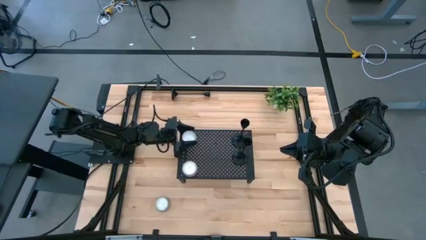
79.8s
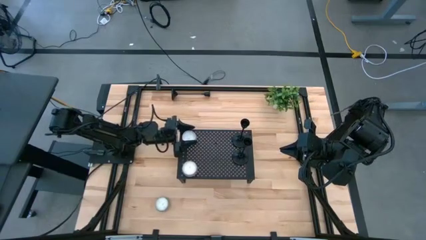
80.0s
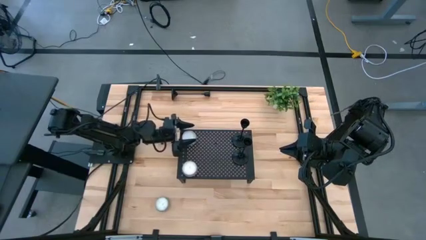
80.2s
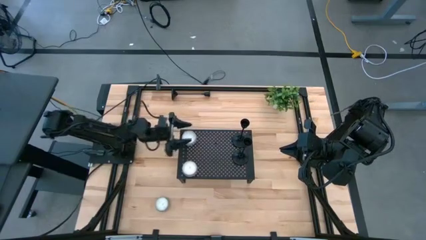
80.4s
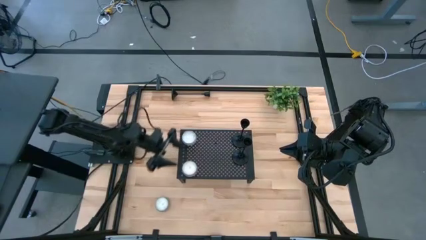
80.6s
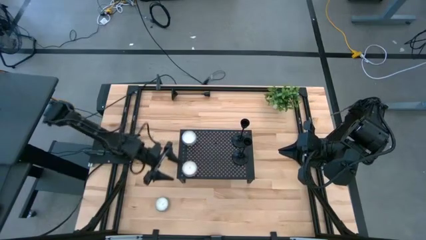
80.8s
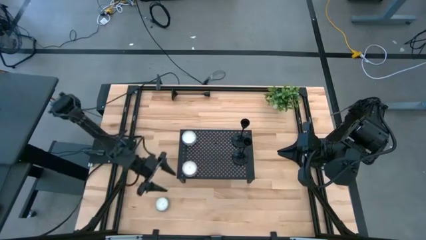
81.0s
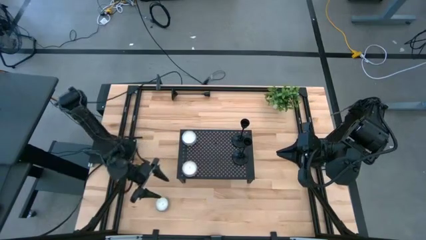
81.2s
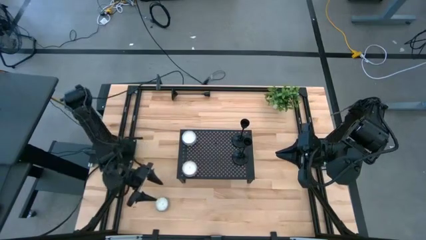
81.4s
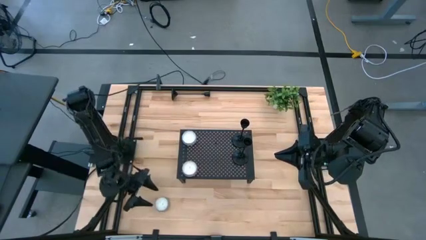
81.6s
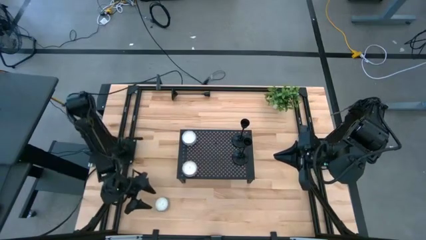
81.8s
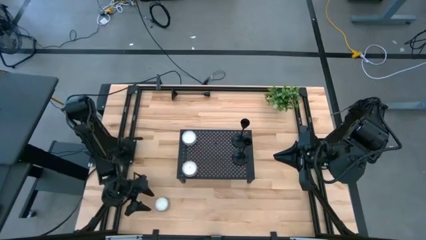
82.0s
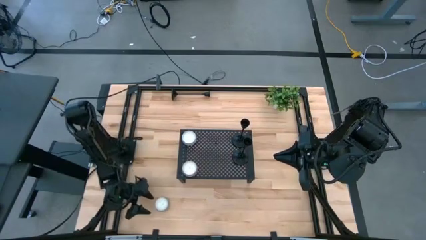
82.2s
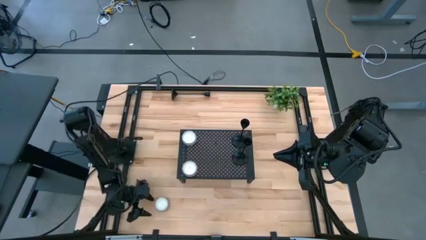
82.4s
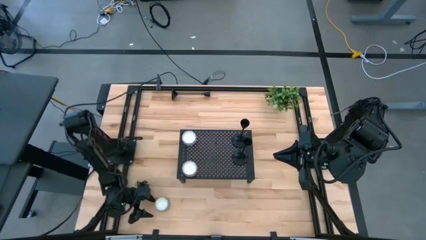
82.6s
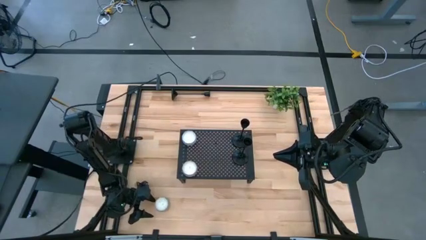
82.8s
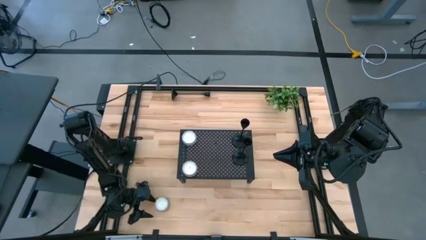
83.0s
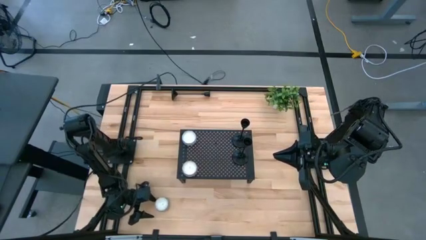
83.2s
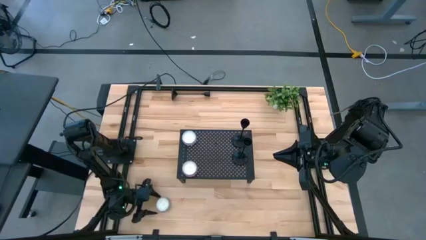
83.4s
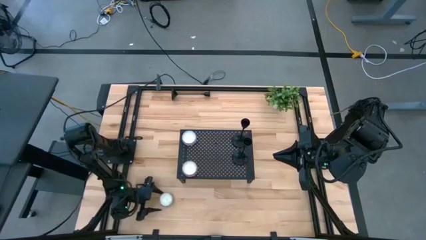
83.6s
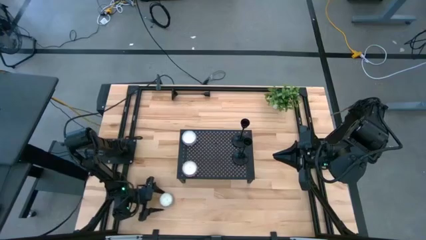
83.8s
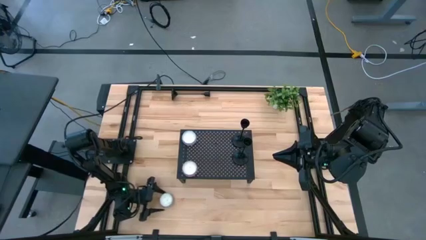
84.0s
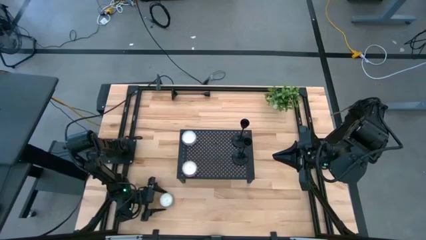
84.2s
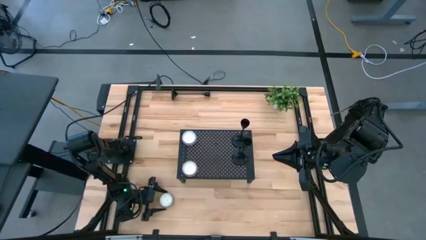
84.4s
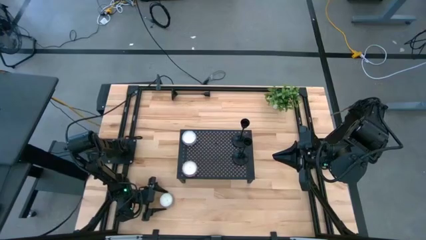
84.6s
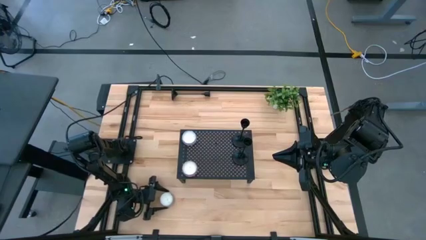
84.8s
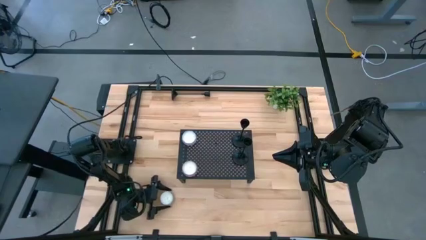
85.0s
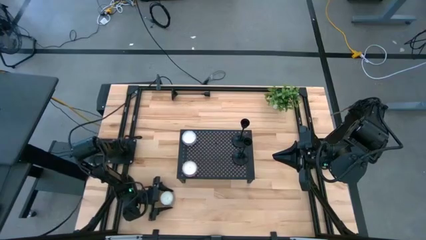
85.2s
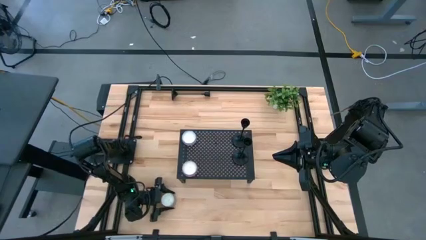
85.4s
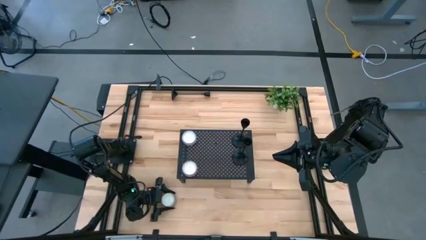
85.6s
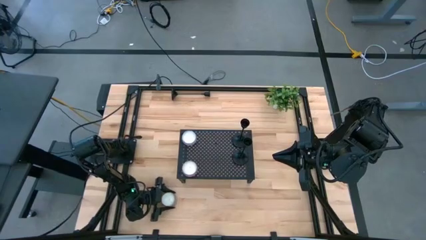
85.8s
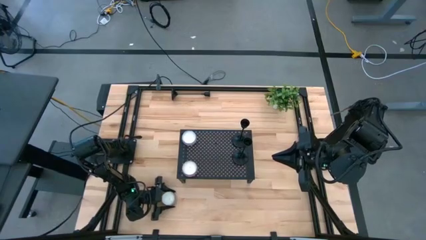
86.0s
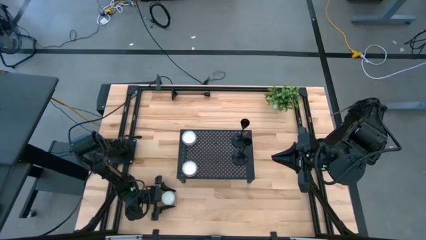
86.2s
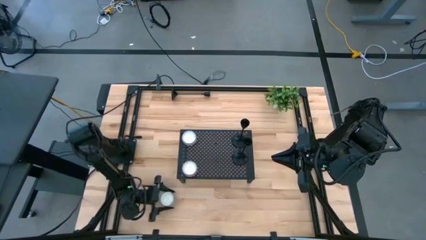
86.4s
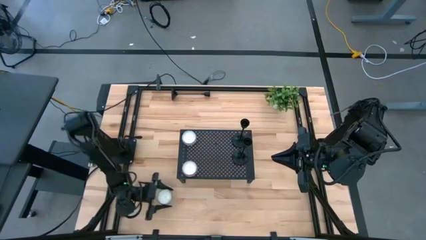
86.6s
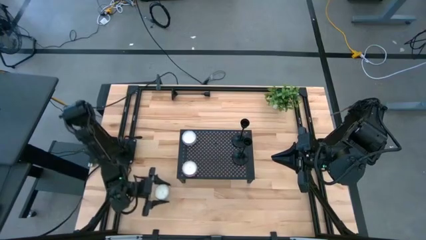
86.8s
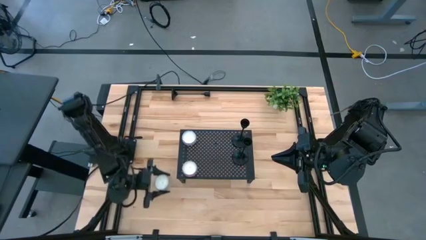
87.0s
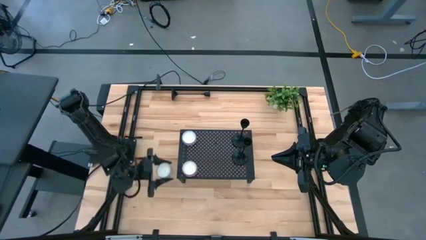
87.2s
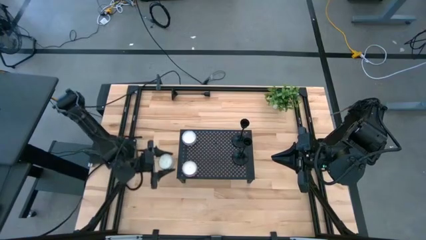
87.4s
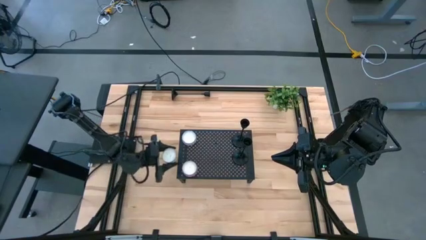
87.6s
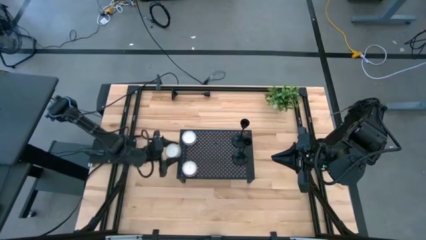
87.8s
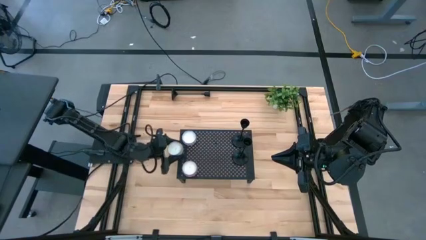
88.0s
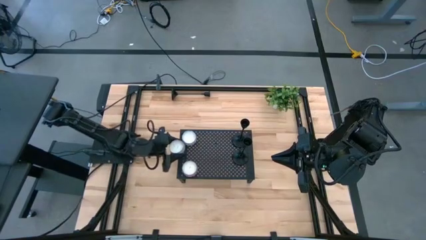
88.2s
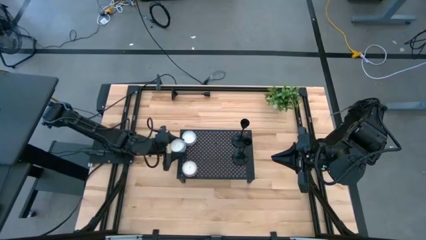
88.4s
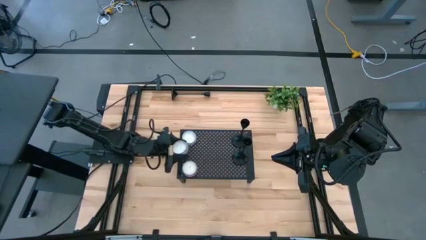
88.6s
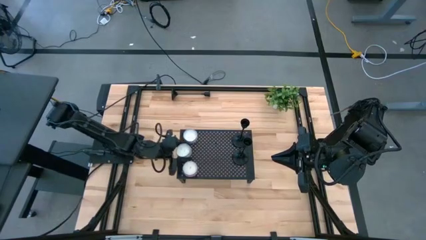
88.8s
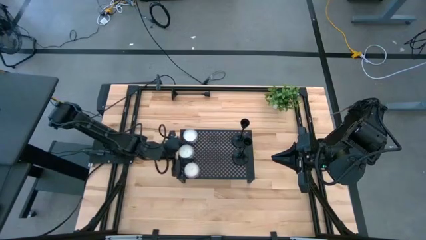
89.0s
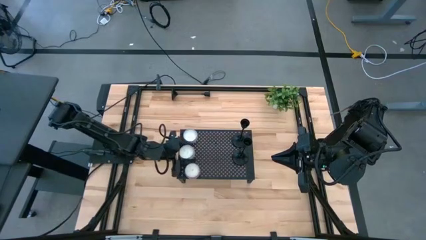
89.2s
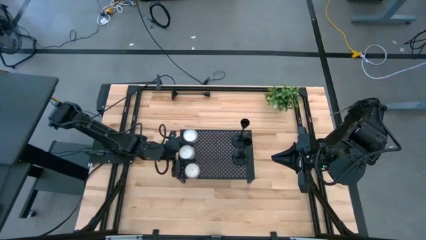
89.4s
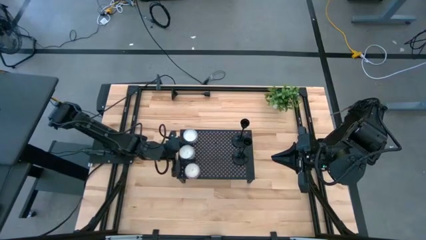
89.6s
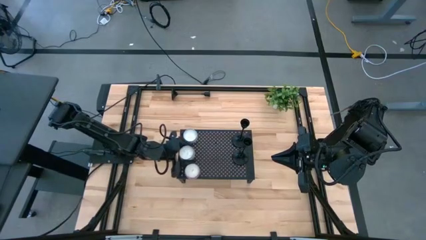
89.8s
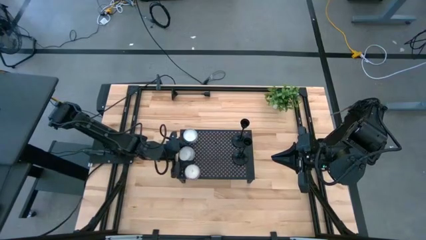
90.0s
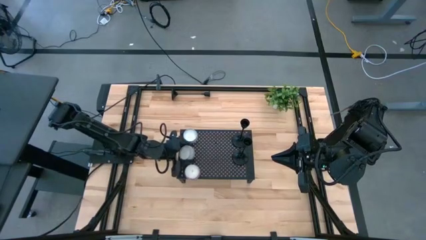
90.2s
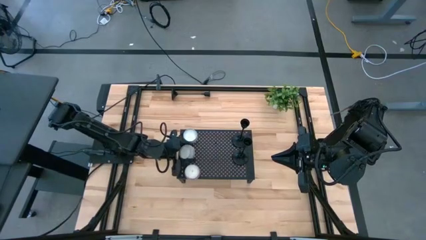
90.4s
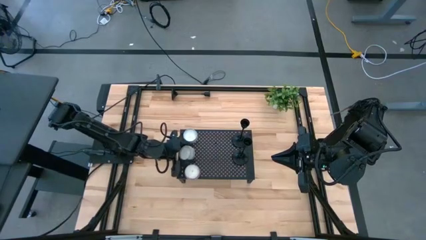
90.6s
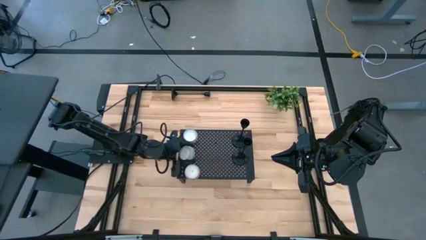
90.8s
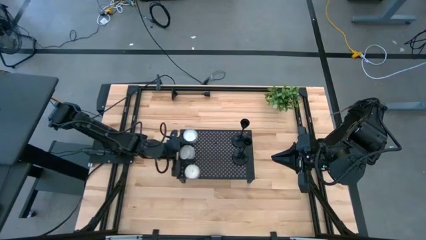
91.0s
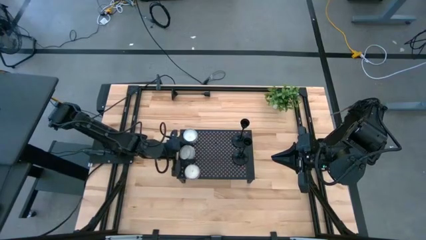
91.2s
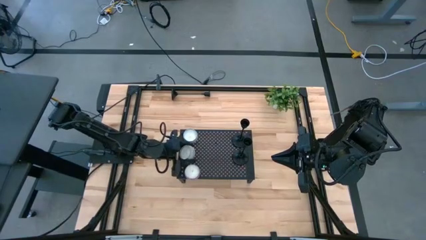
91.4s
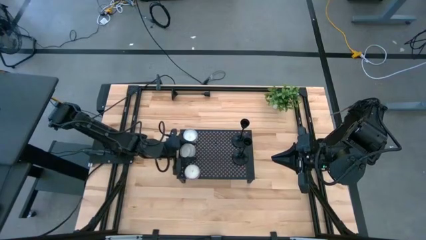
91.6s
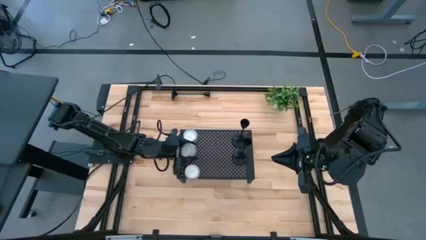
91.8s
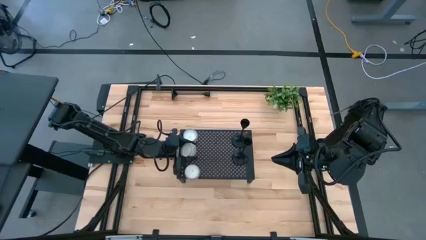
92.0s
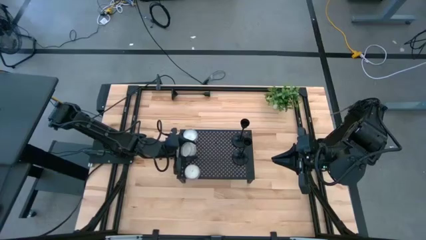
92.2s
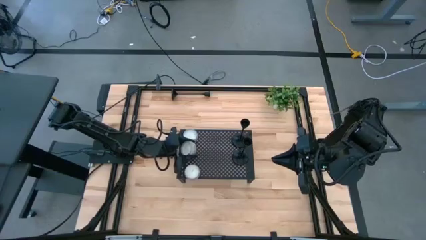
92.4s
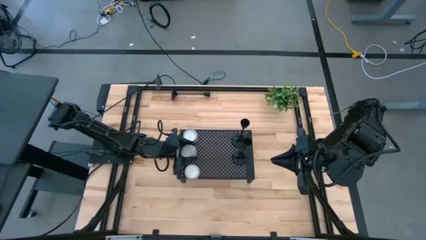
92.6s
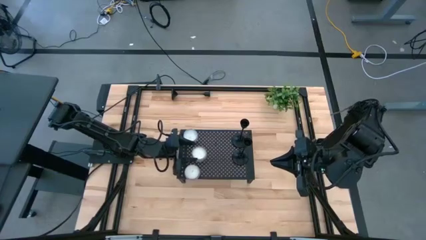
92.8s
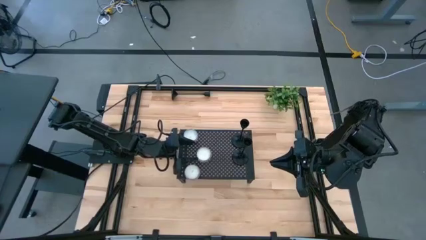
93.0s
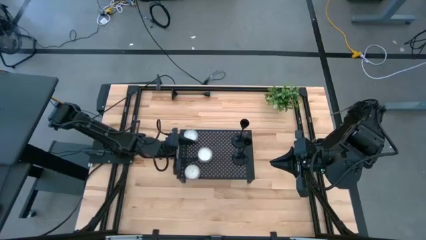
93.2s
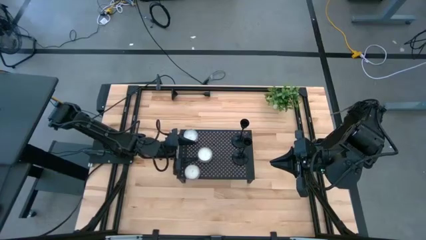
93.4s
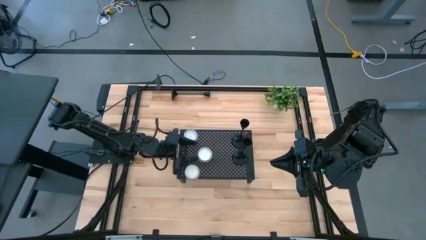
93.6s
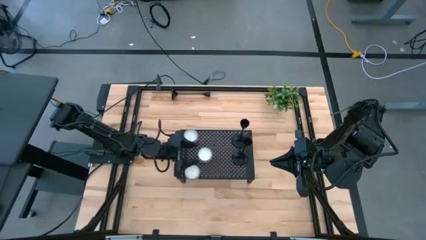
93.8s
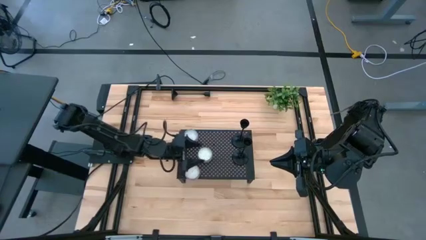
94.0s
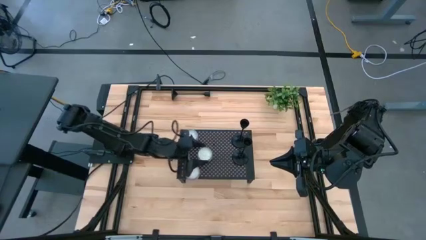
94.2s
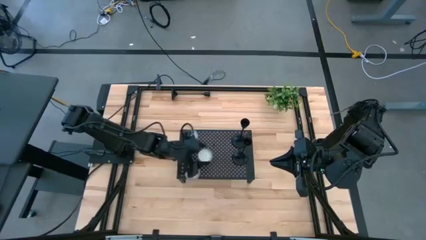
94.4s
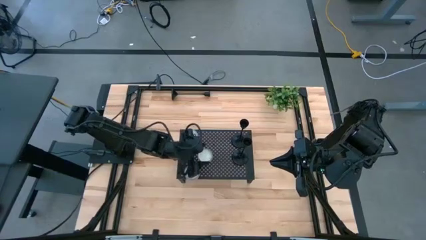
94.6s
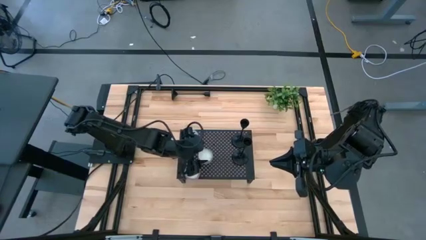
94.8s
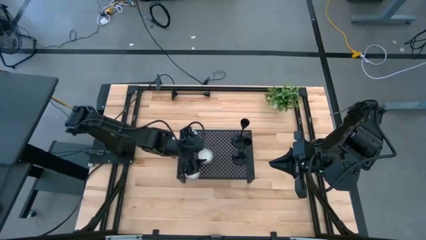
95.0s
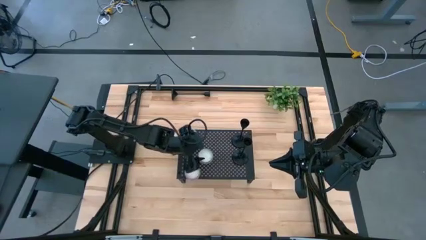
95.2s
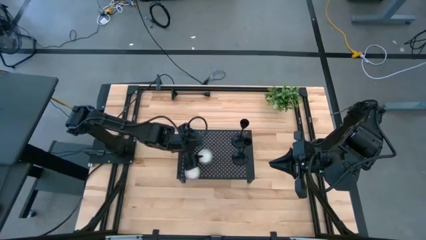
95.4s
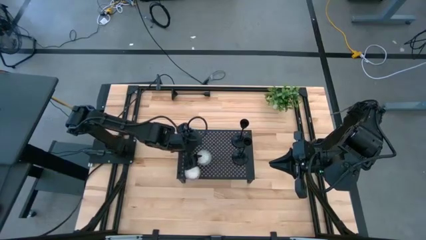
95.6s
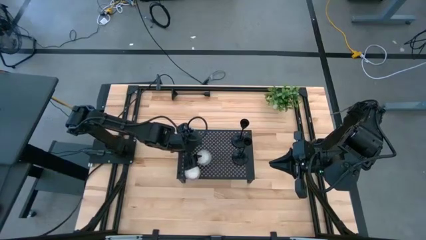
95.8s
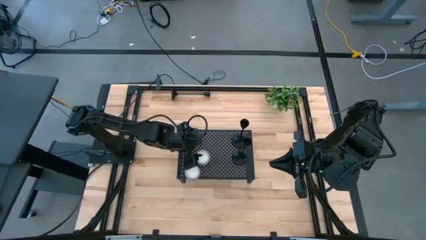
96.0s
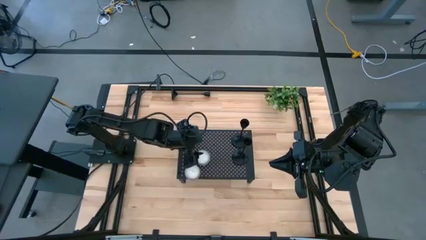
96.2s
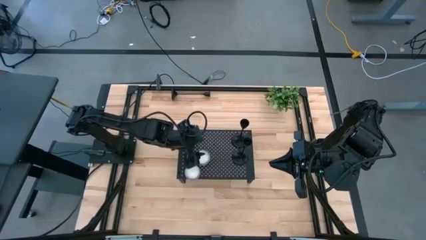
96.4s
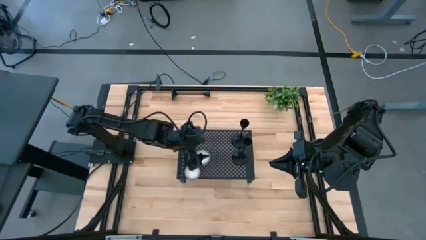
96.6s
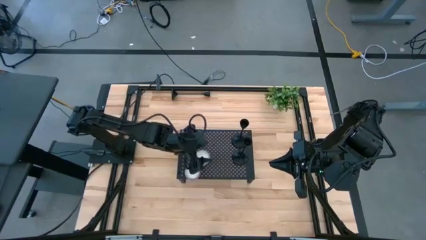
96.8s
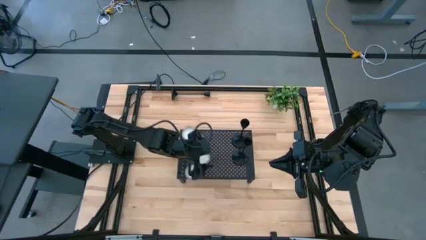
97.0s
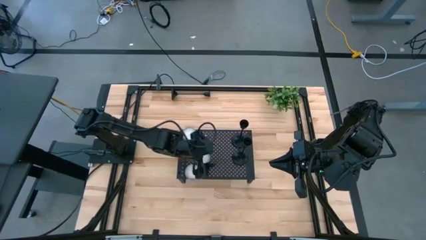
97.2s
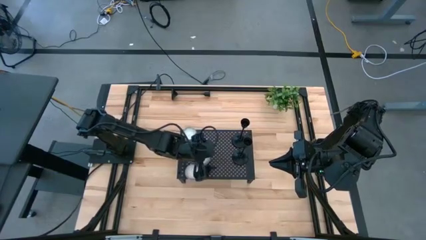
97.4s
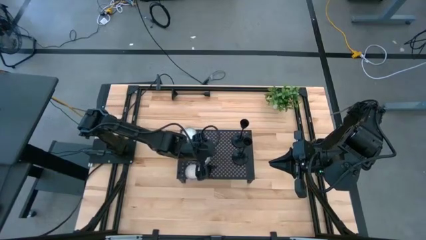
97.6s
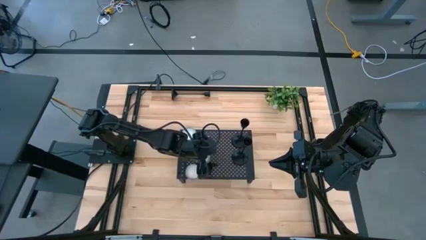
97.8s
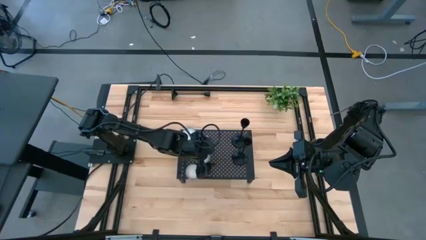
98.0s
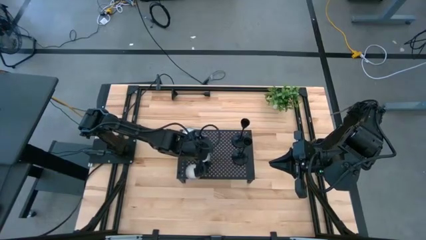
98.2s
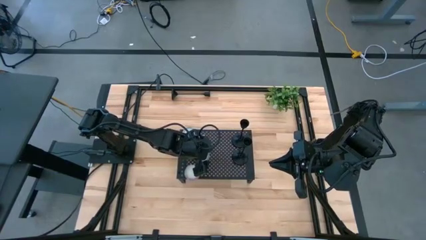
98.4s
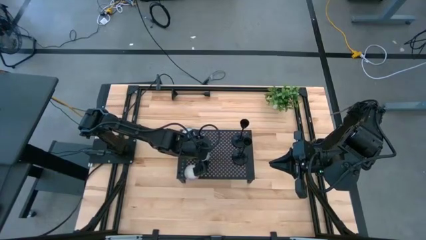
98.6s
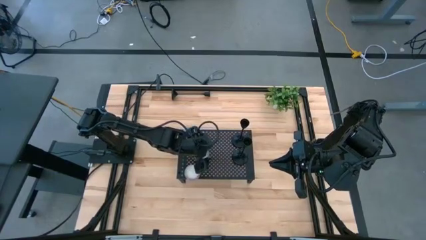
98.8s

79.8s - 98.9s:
Task: Pick & Place candle stick holders
Put the blue patterned scented candle on the shelf aligned with the other scented candles
